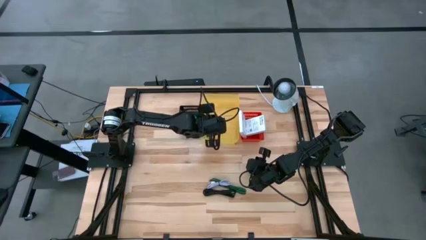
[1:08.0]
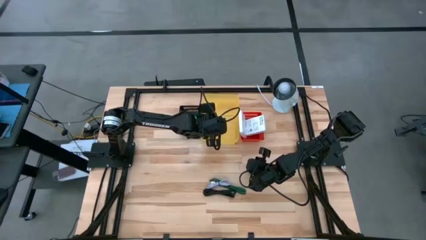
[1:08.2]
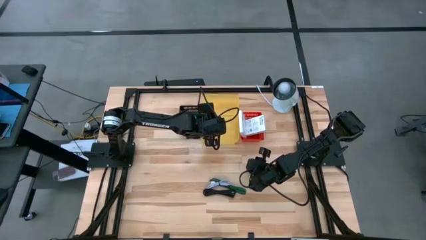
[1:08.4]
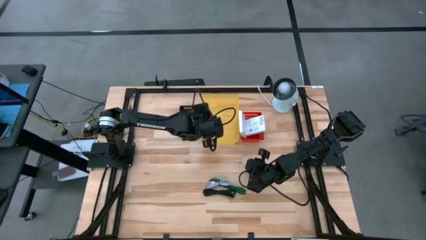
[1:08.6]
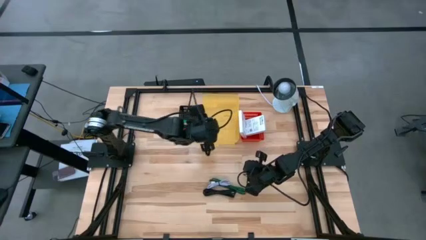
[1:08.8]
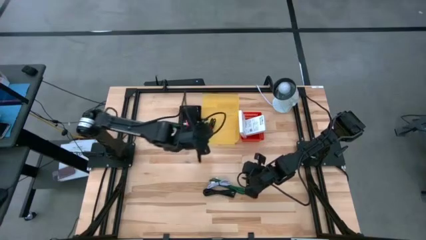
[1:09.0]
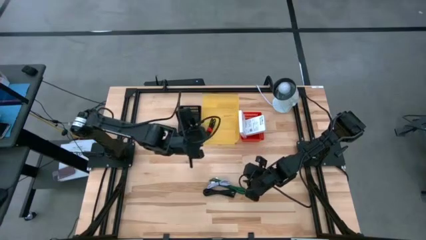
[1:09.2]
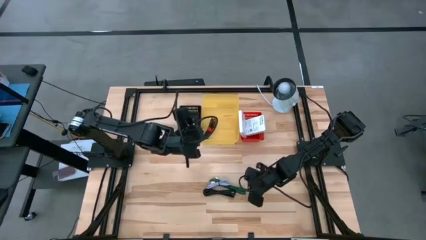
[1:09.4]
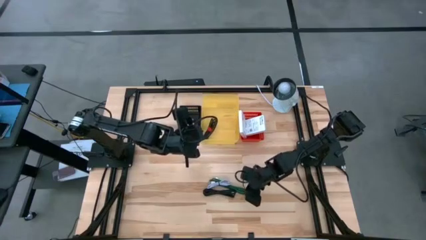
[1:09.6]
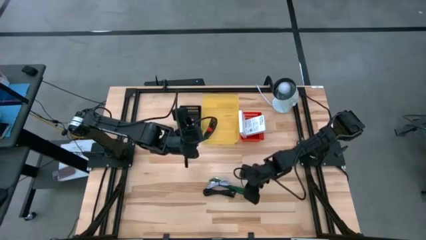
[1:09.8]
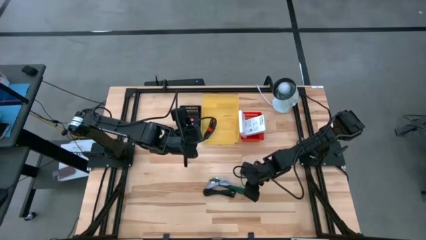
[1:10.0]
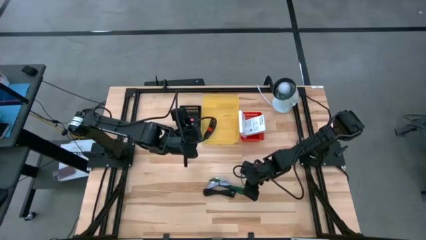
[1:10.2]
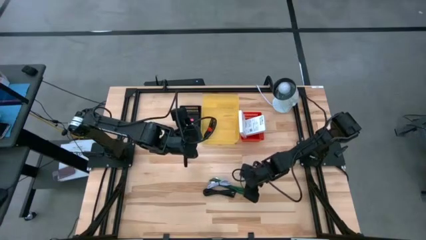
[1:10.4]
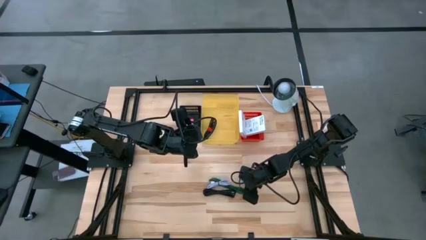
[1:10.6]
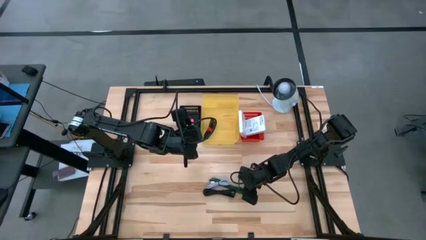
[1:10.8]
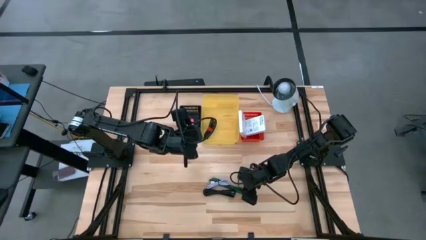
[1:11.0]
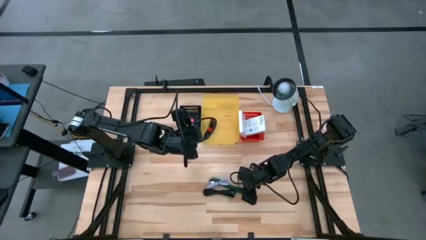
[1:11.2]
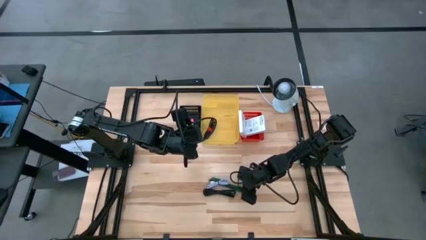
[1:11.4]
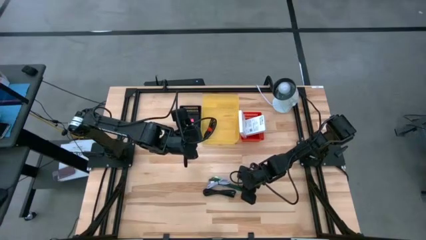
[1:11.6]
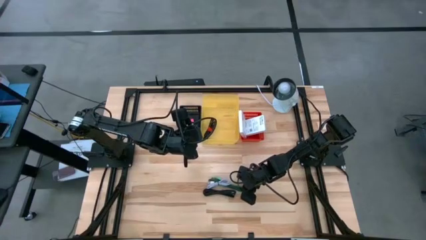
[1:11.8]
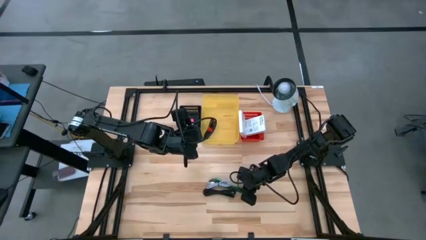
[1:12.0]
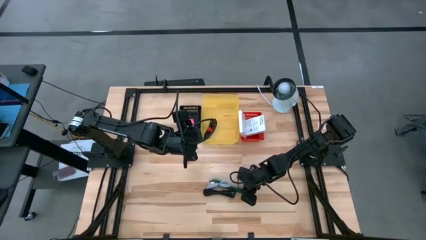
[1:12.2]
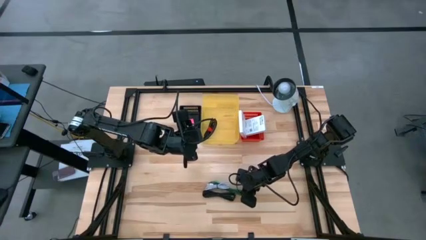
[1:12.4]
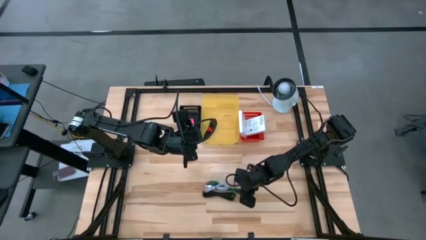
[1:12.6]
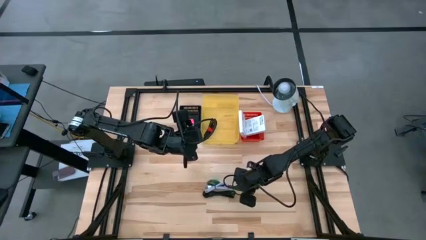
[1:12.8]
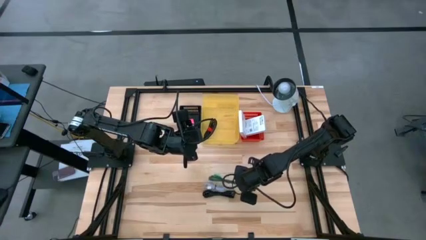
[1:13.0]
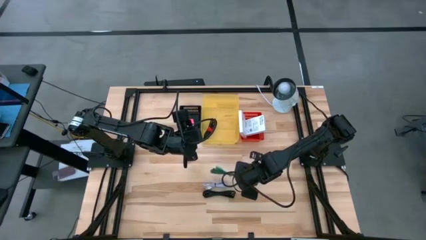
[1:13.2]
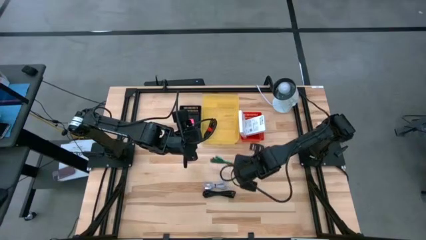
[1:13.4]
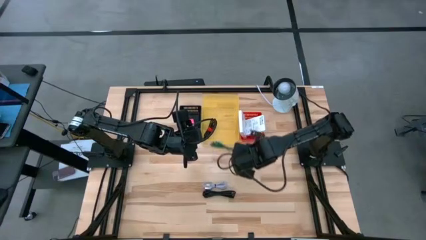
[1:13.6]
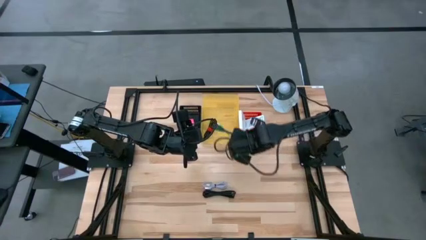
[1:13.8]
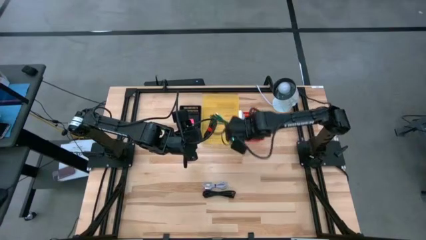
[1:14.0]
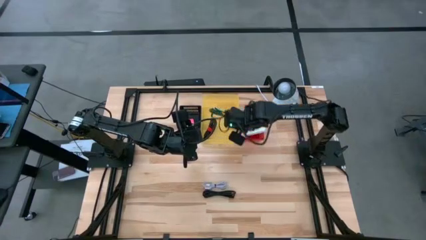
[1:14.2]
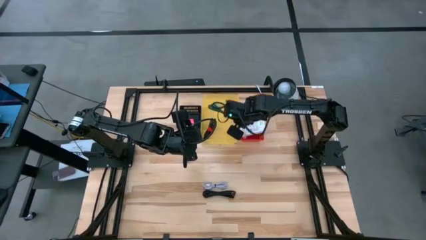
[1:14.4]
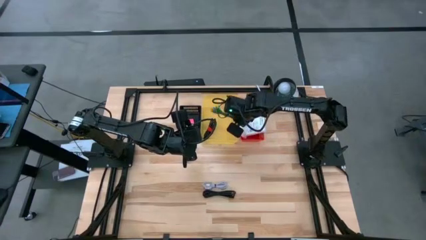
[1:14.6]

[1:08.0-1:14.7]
Task: Pick and place items into bin
Put the green USB cable into the yellow bin

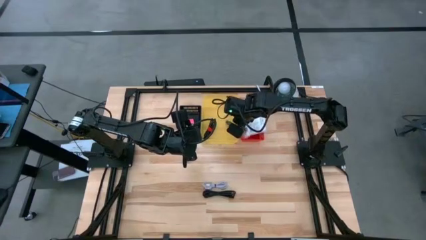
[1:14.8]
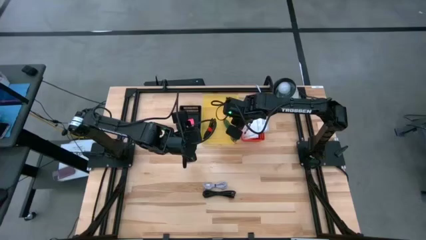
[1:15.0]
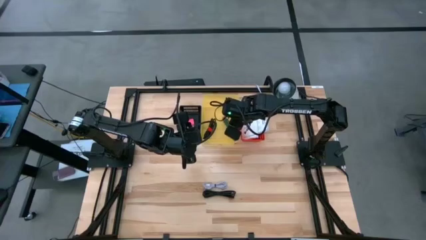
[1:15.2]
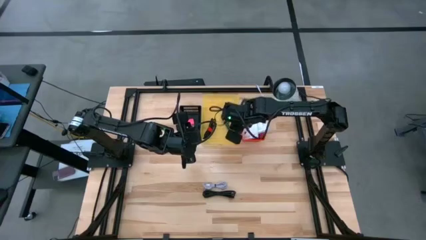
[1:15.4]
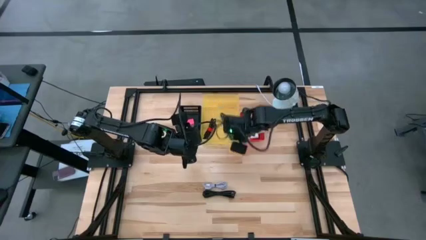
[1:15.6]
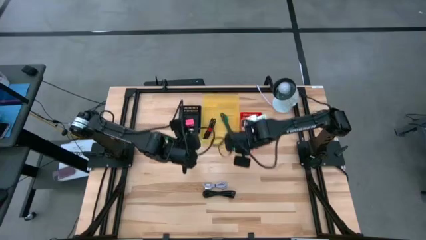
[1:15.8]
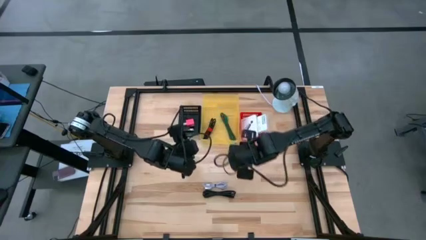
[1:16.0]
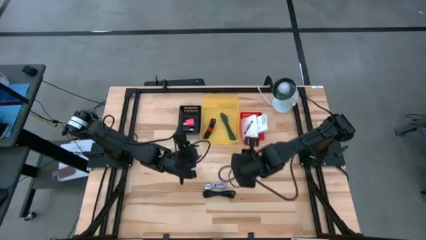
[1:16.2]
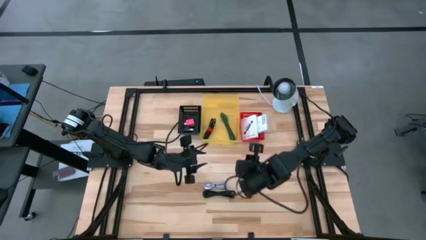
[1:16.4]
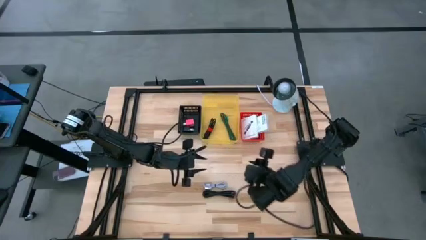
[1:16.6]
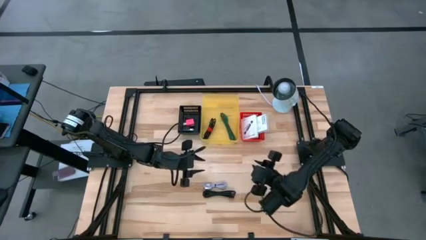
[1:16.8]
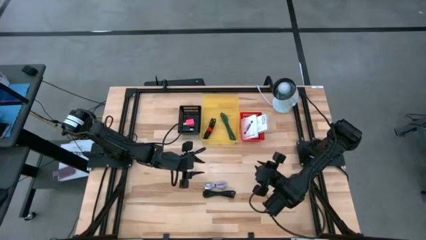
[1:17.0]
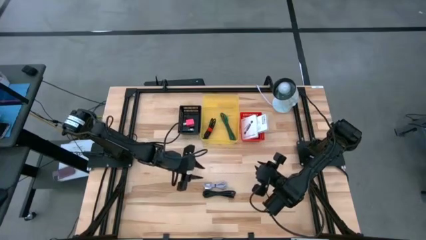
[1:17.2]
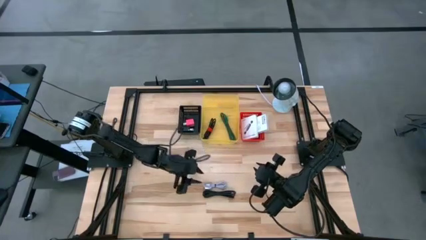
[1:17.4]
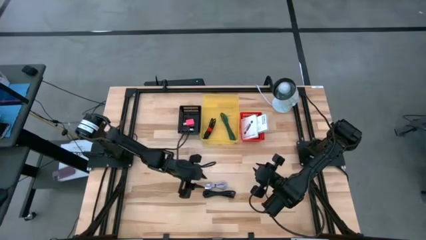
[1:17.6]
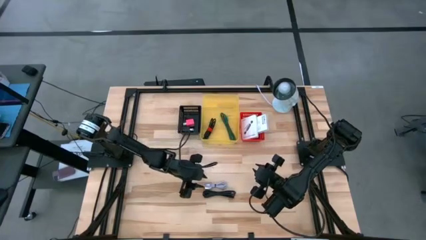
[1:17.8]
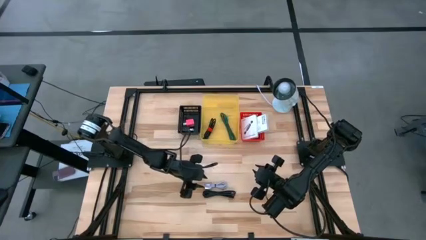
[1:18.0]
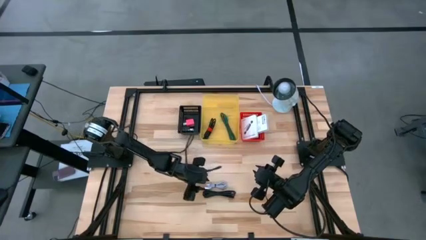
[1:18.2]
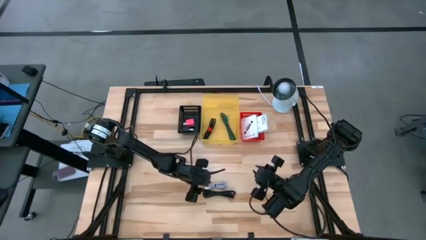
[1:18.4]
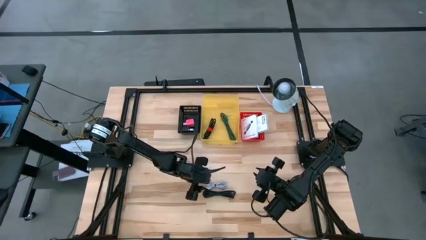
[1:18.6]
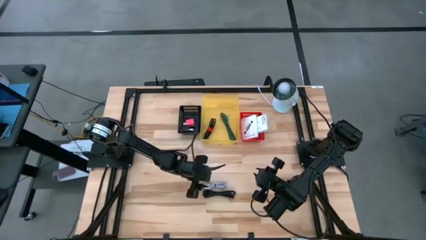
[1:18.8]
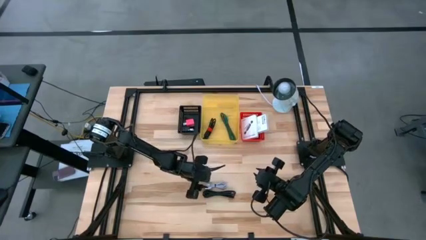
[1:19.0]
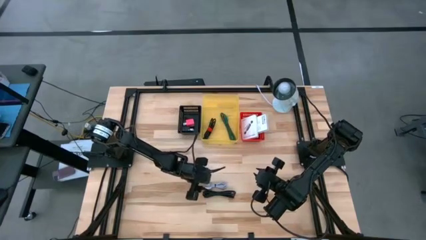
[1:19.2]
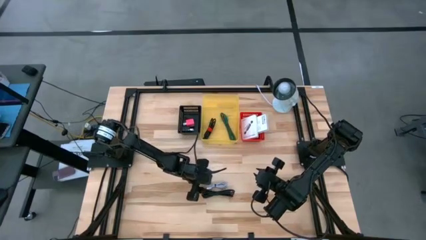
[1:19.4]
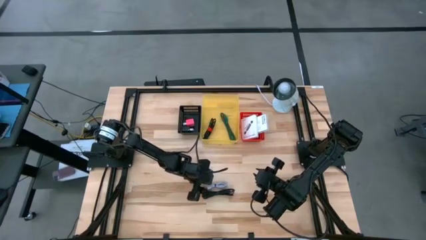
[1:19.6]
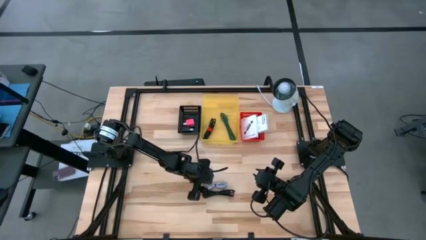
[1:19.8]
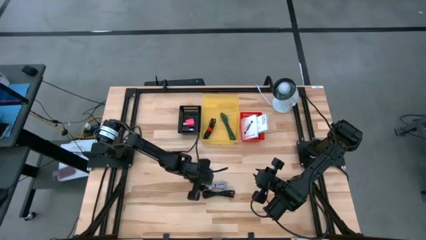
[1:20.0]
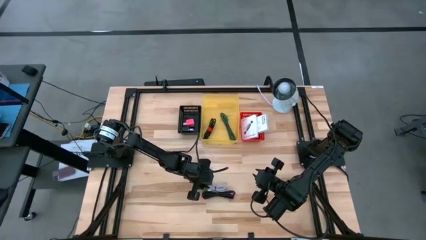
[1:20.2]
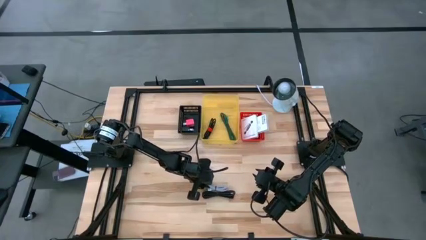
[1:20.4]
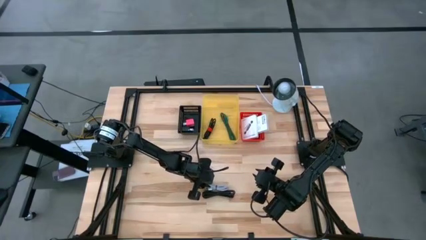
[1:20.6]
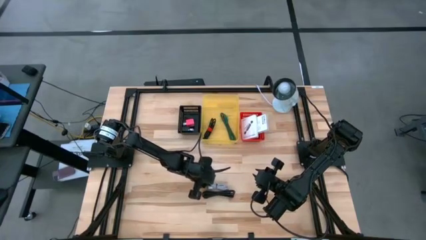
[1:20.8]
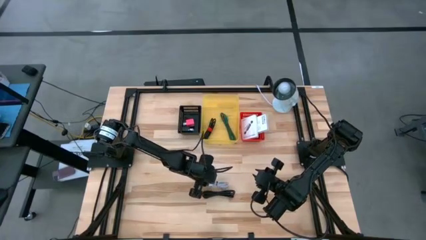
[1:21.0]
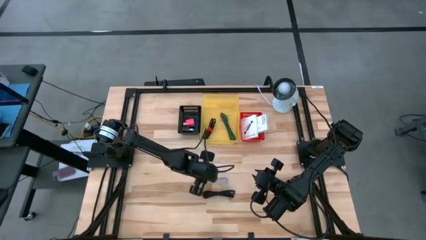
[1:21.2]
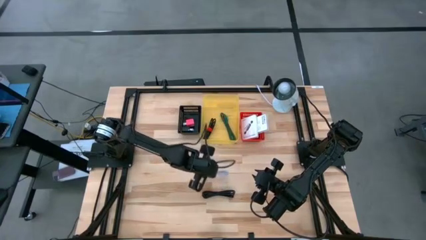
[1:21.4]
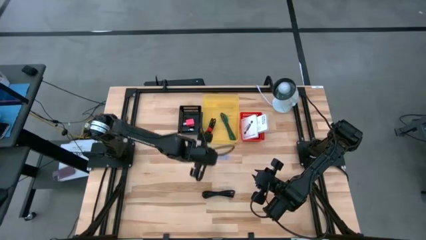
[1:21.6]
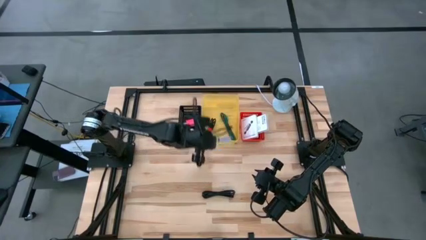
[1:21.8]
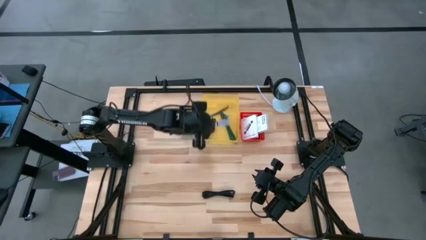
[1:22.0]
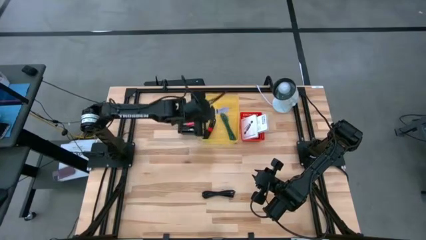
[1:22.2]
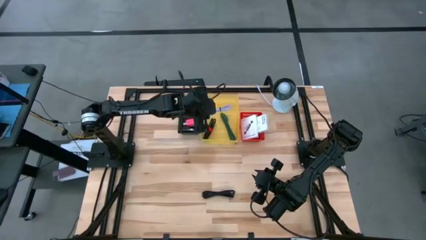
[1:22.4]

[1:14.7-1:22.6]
Put the white USB cable into the yellow bin
